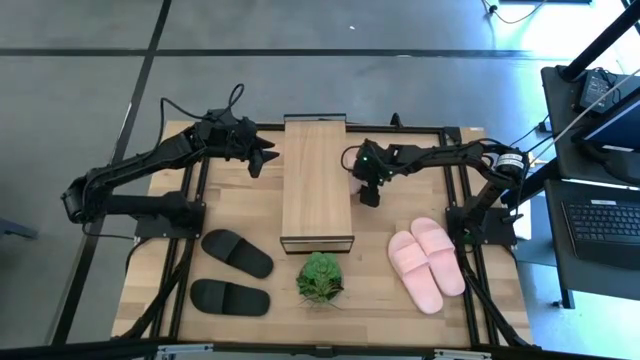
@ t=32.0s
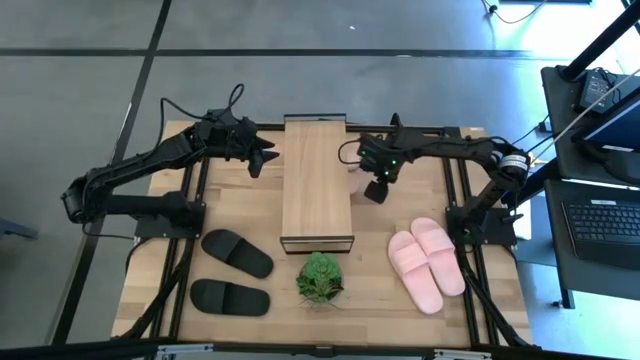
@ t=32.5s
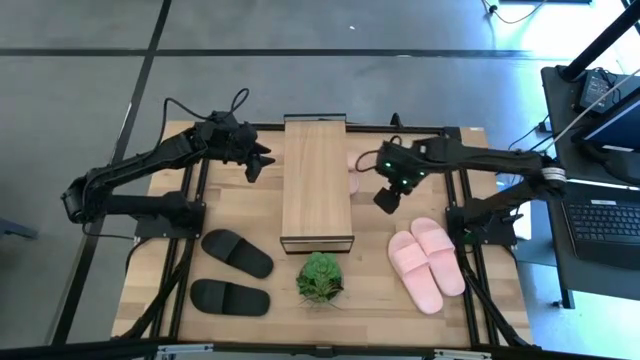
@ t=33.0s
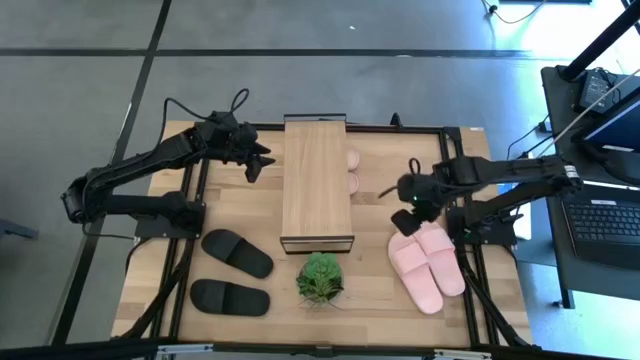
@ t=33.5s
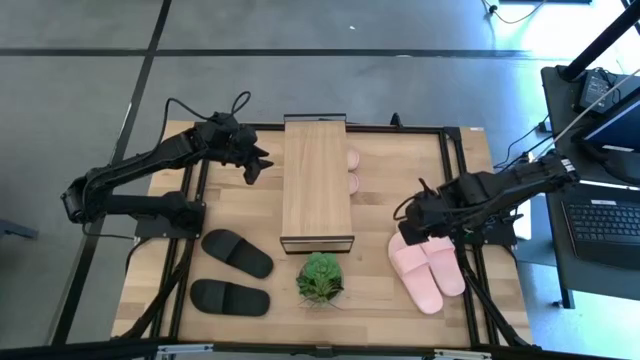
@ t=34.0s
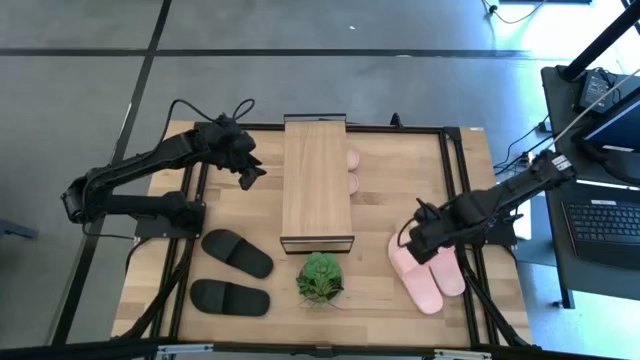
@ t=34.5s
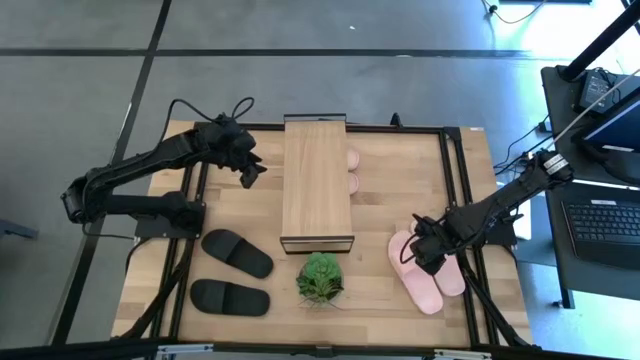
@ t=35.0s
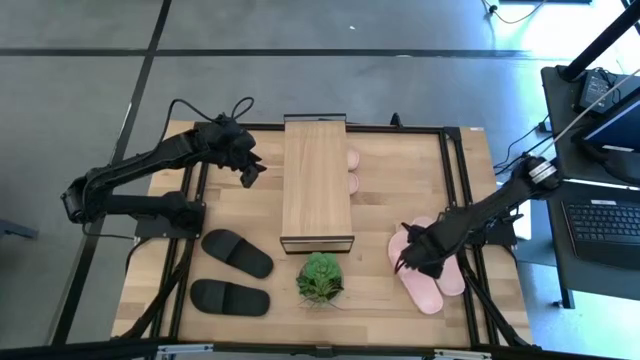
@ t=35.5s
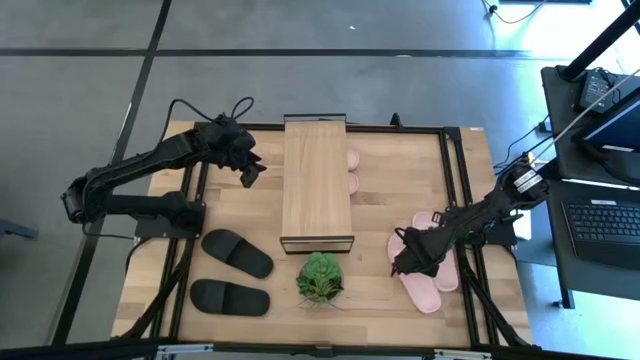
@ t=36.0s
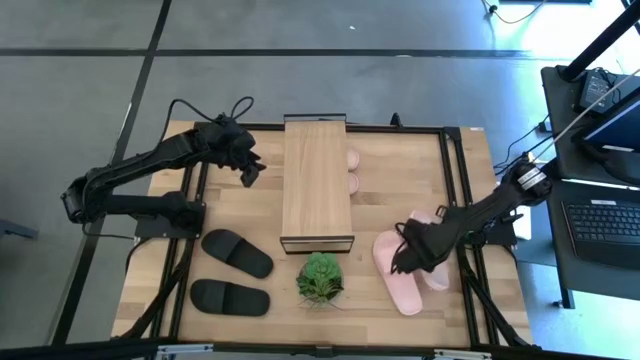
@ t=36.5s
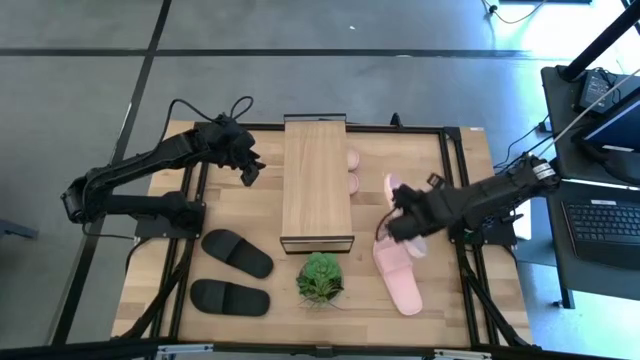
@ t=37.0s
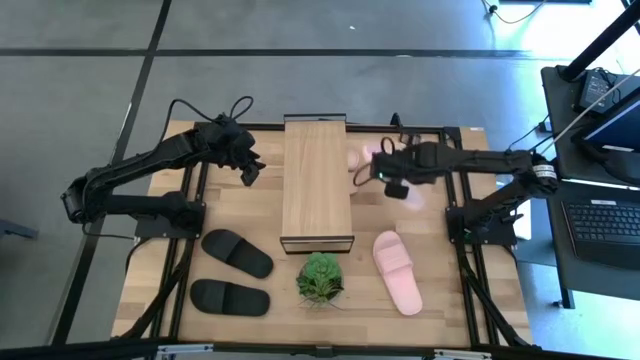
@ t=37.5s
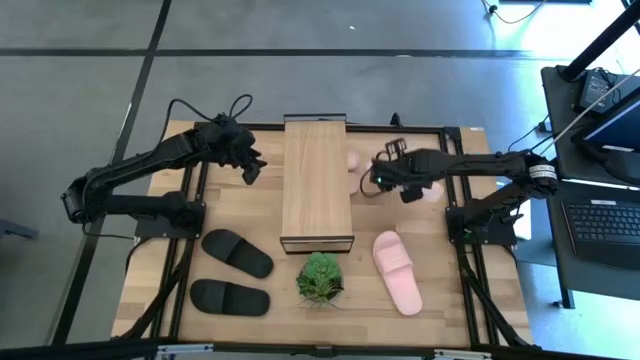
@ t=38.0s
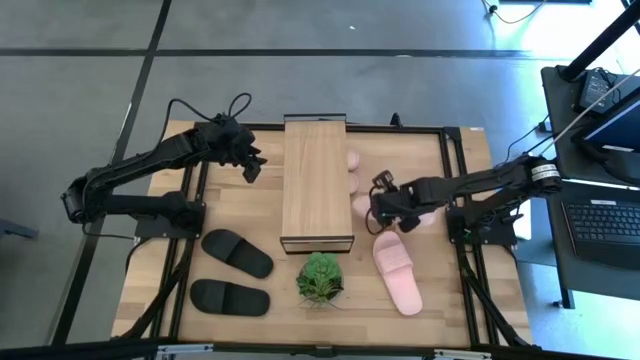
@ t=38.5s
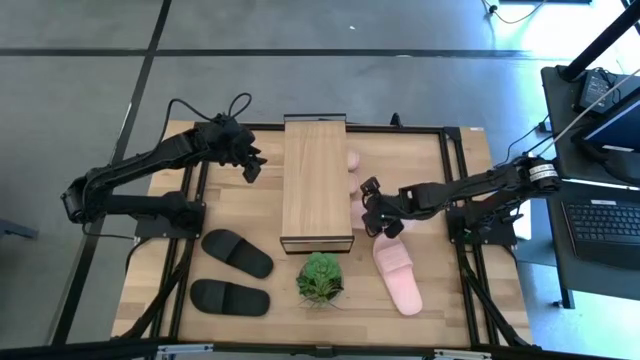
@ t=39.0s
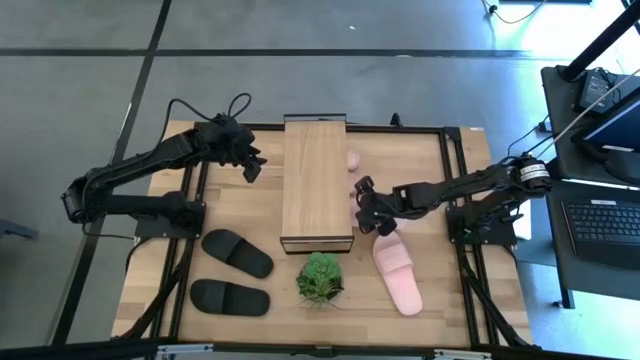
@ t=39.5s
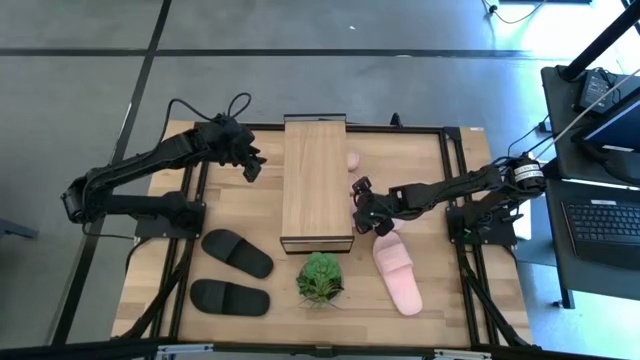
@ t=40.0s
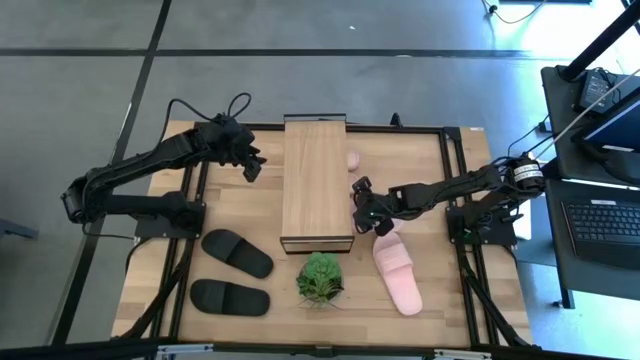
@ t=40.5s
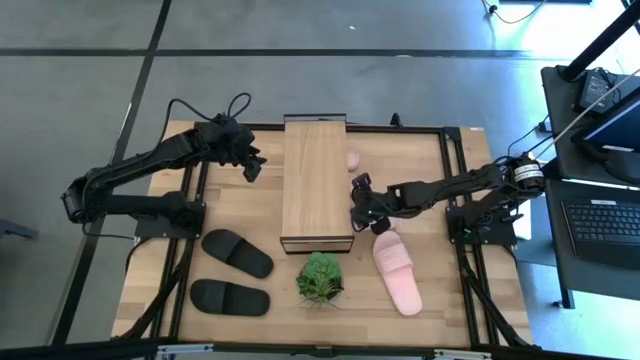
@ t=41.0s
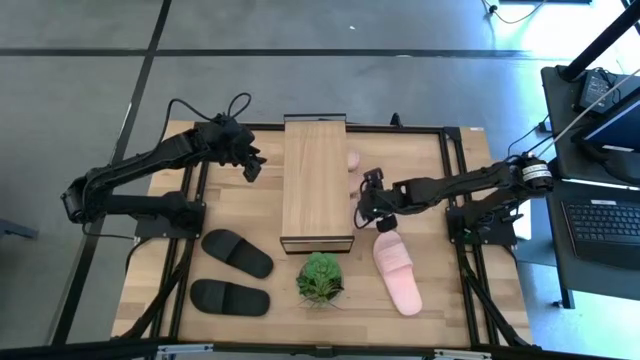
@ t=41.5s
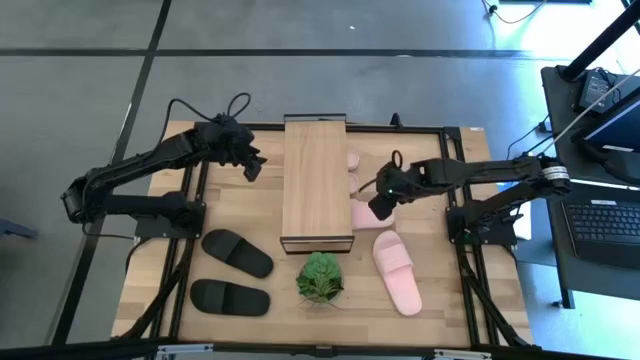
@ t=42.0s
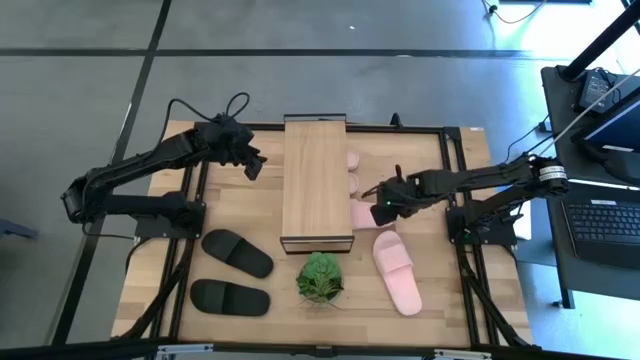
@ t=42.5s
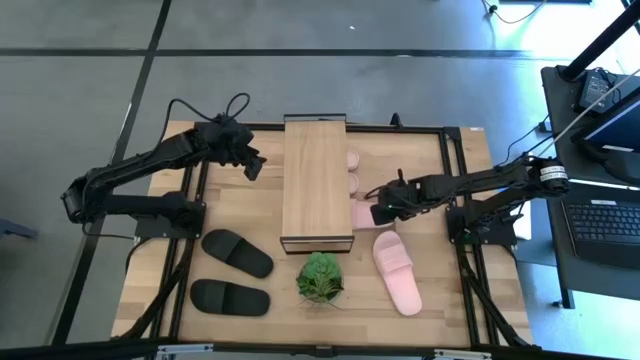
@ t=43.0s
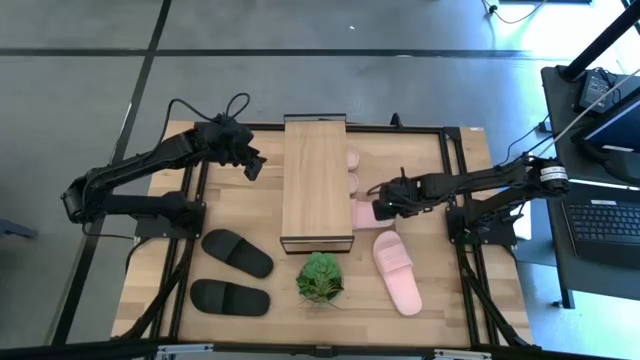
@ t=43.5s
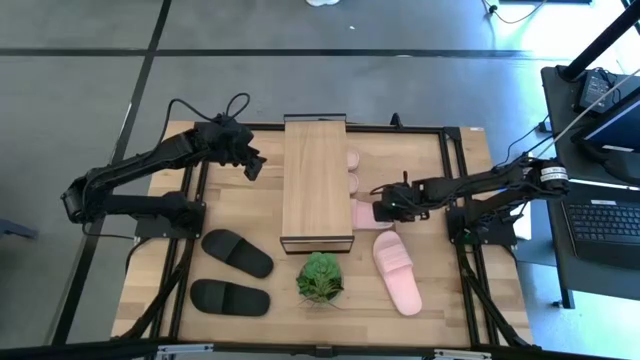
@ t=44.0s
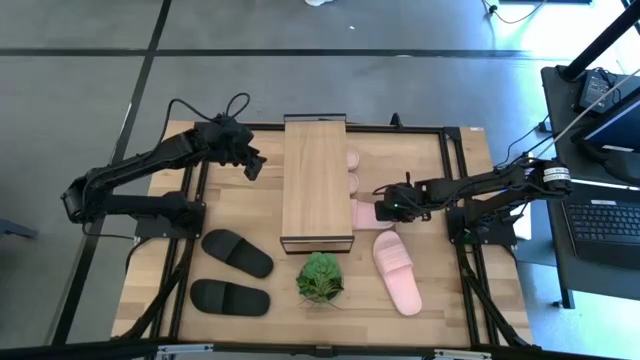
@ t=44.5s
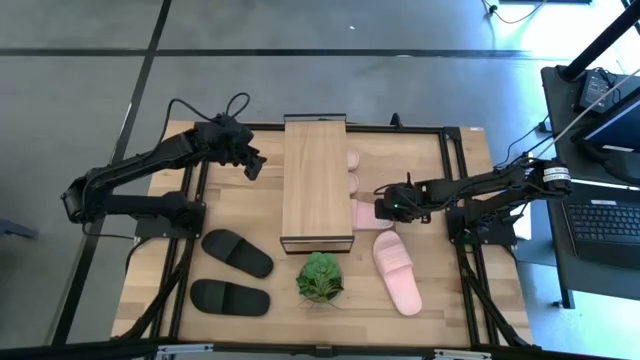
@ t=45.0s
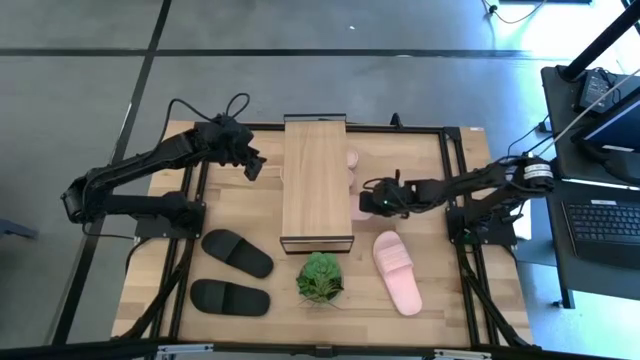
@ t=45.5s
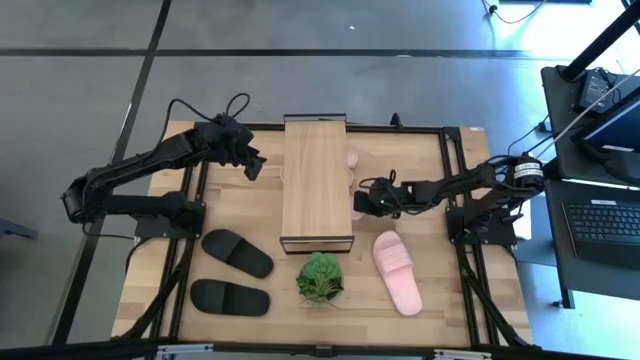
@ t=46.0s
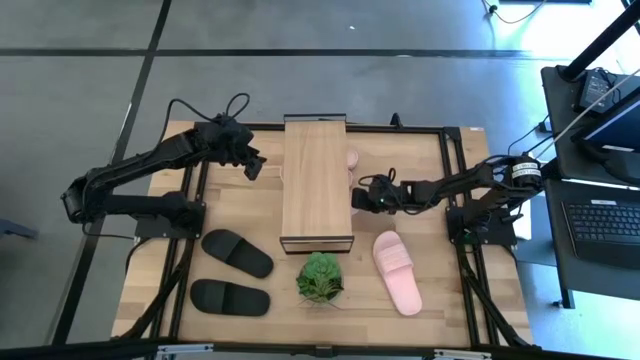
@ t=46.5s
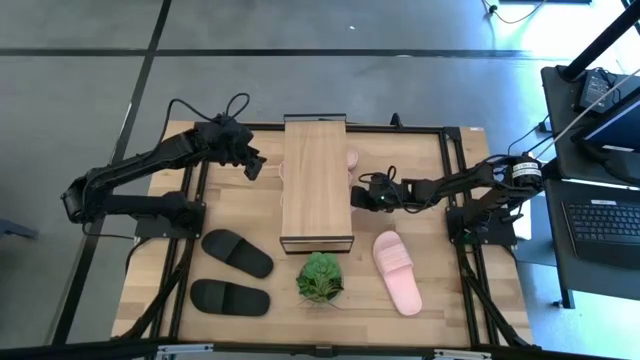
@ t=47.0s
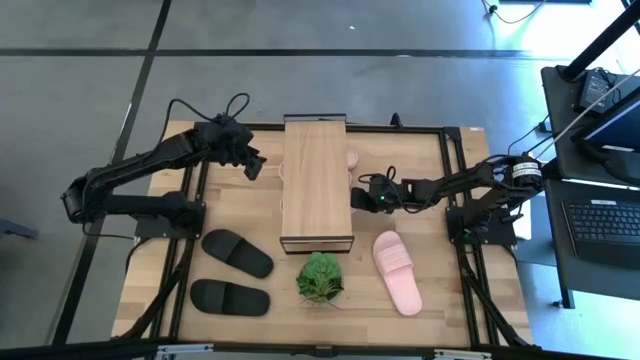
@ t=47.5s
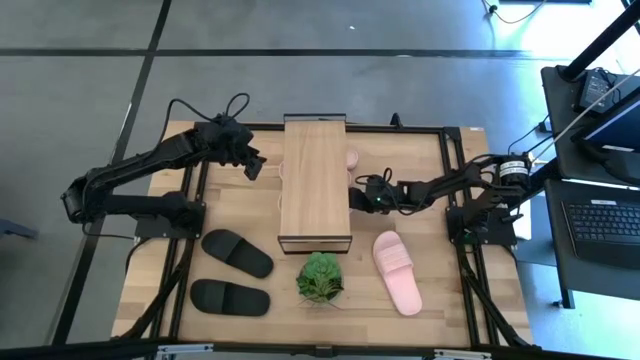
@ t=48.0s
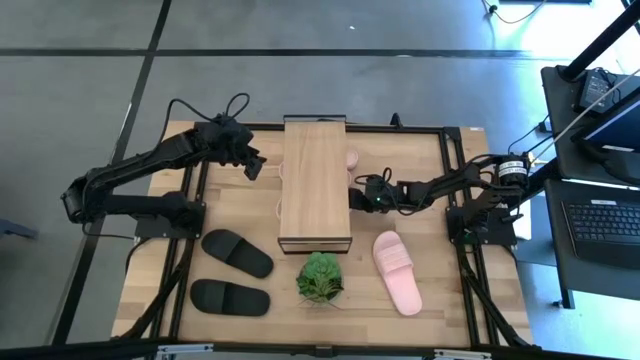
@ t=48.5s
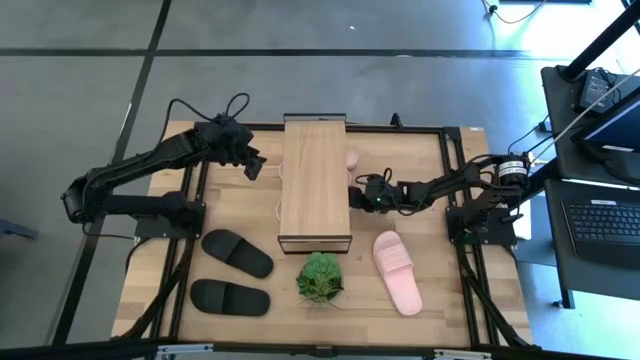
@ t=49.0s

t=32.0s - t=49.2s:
Task: Pick and place slides into the shelf
Put the pink slipper under the shelf

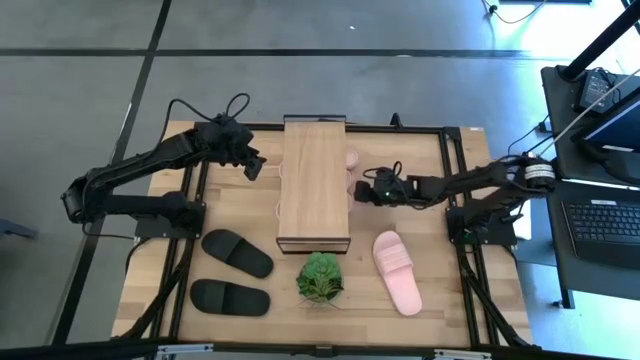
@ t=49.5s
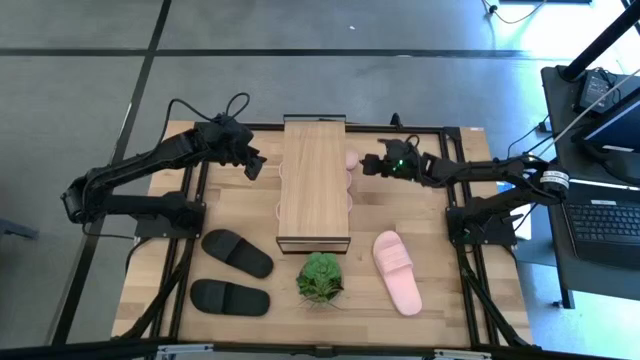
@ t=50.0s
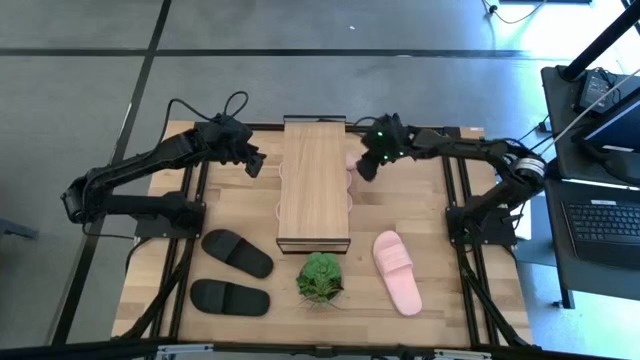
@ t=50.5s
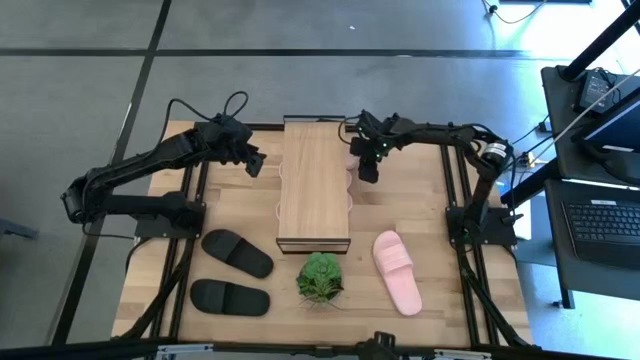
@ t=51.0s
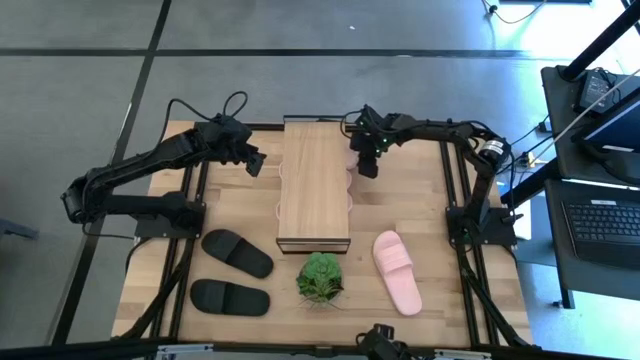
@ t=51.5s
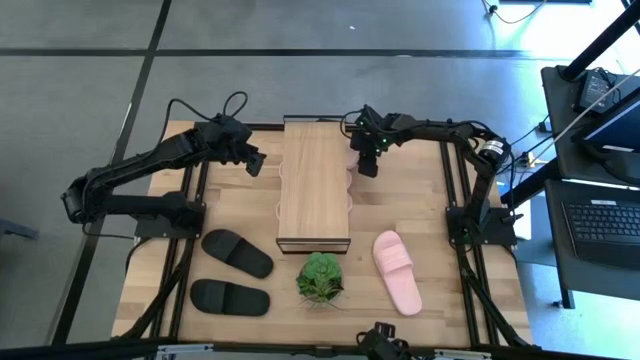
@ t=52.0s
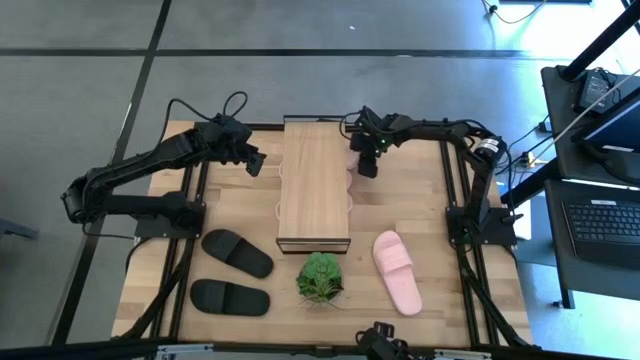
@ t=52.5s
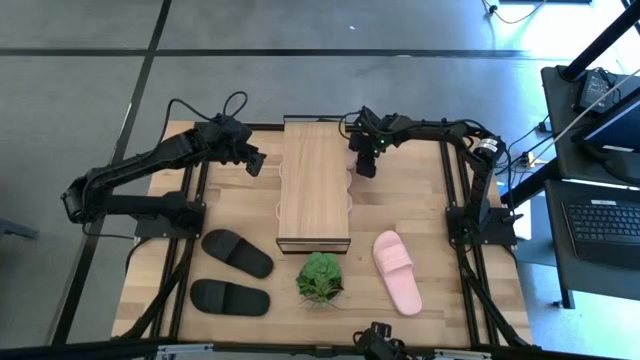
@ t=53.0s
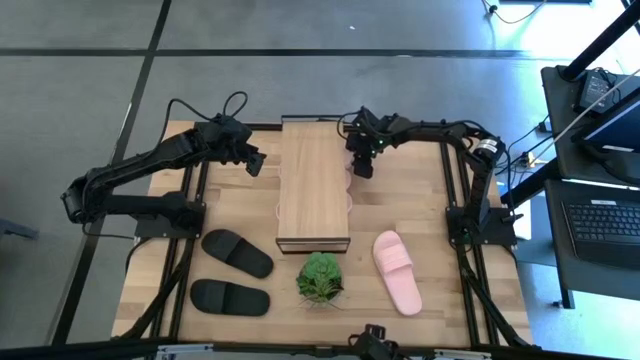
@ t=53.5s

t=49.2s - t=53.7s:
Adjust the pink slipper under the shelf
